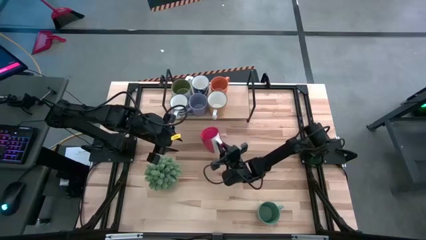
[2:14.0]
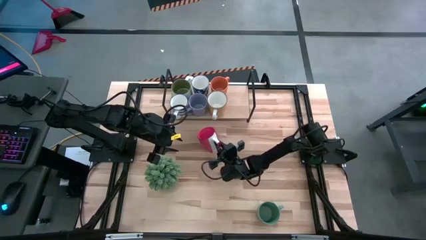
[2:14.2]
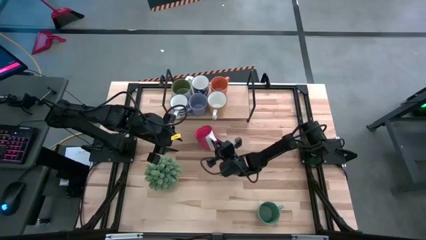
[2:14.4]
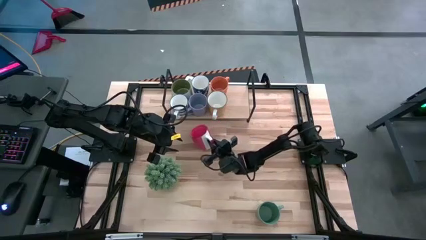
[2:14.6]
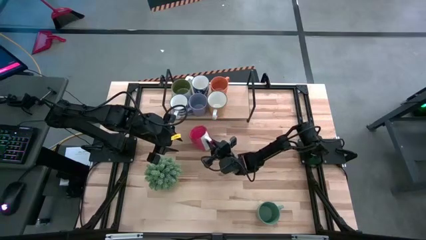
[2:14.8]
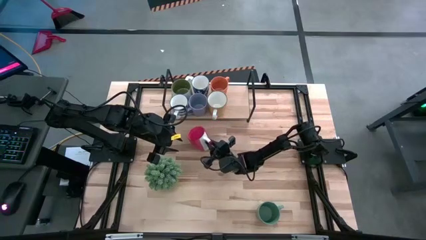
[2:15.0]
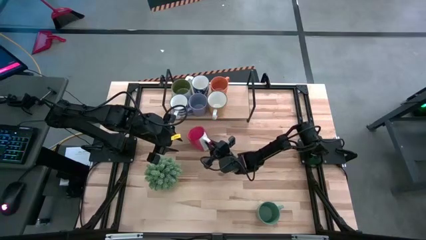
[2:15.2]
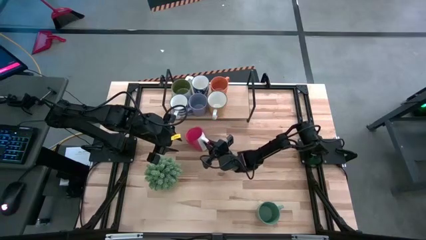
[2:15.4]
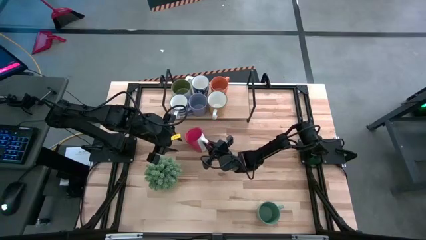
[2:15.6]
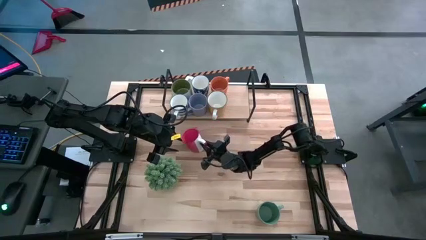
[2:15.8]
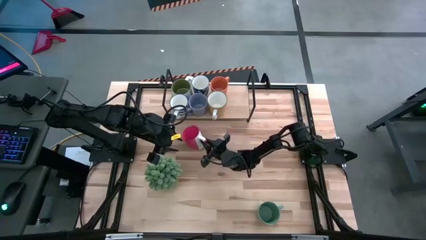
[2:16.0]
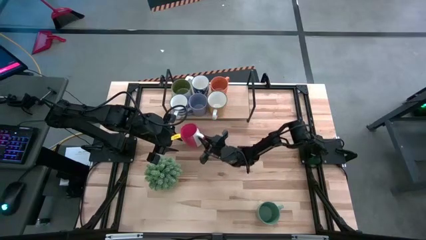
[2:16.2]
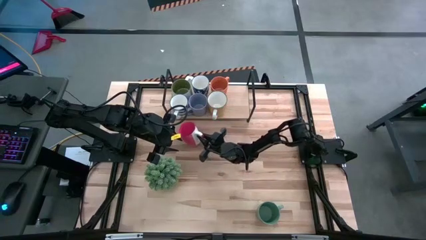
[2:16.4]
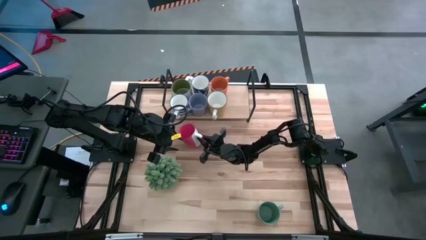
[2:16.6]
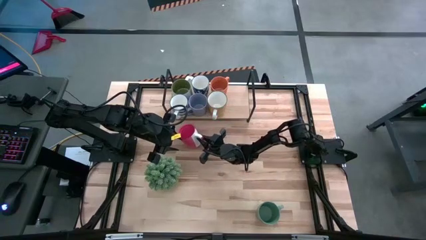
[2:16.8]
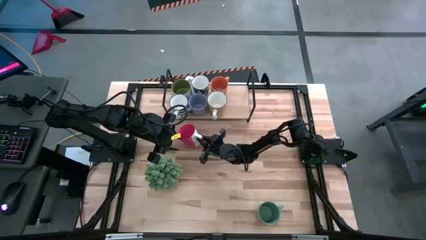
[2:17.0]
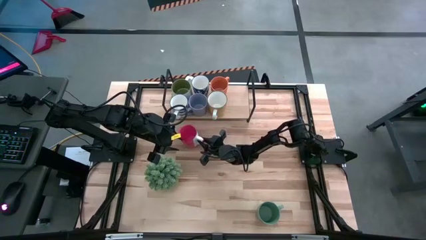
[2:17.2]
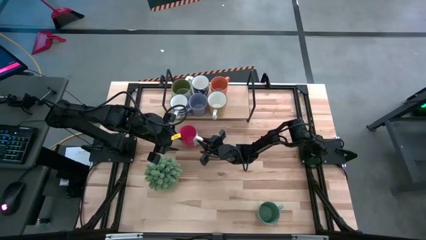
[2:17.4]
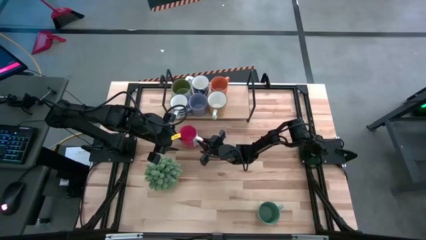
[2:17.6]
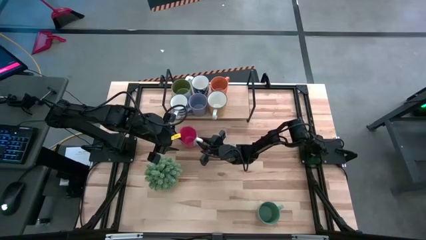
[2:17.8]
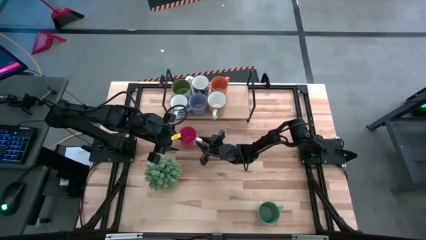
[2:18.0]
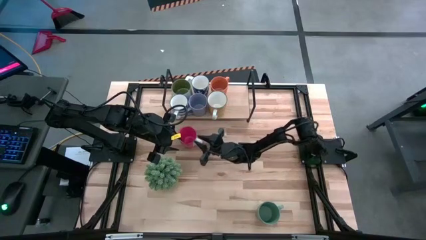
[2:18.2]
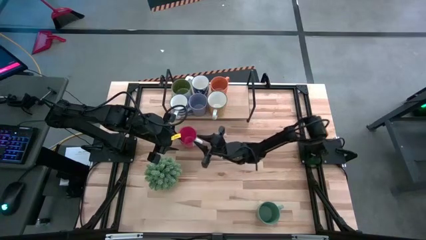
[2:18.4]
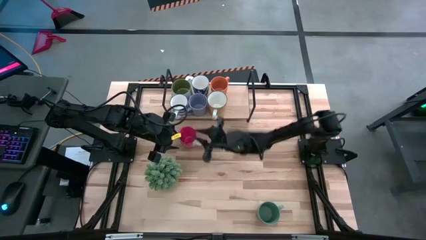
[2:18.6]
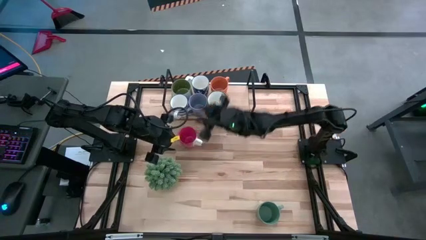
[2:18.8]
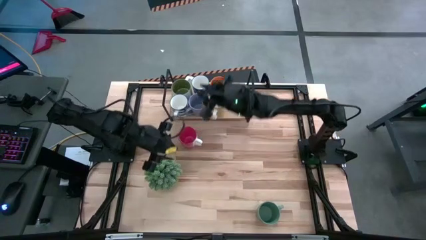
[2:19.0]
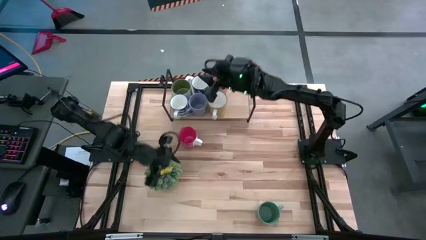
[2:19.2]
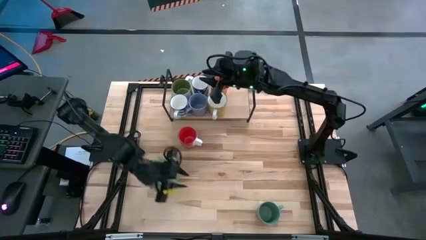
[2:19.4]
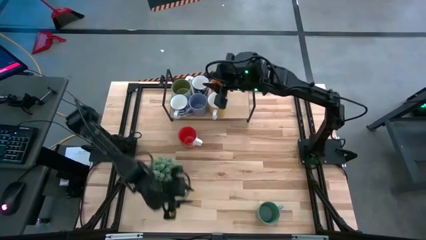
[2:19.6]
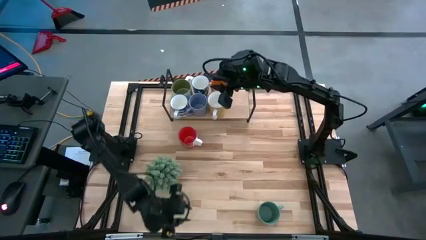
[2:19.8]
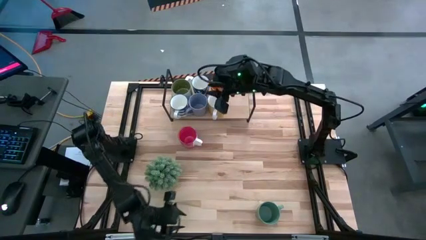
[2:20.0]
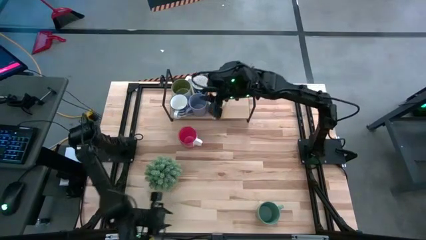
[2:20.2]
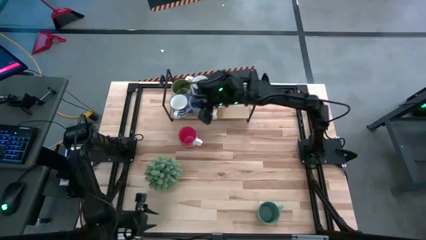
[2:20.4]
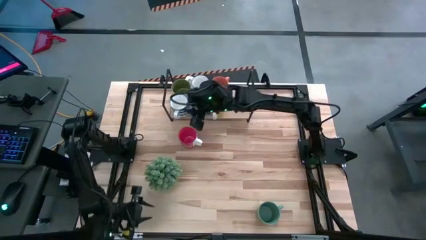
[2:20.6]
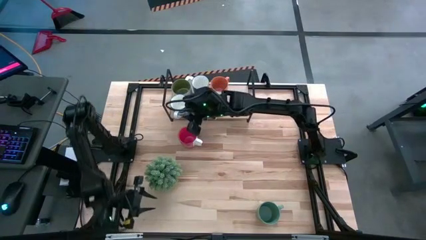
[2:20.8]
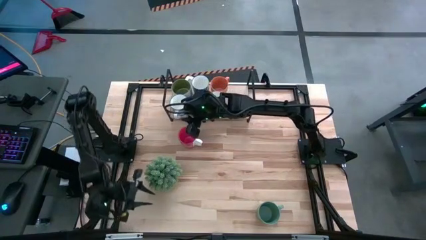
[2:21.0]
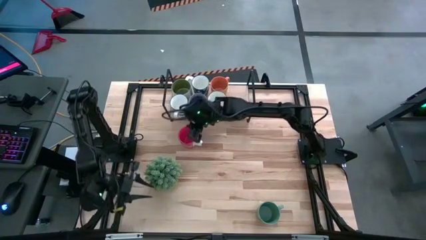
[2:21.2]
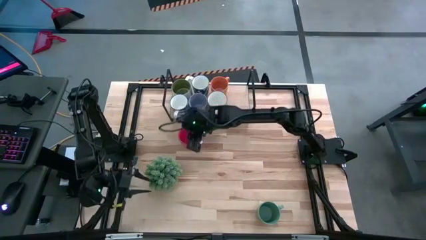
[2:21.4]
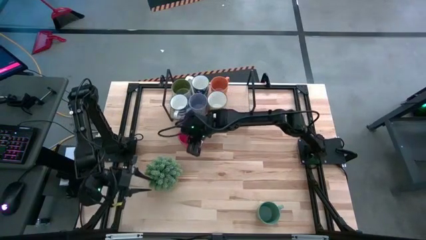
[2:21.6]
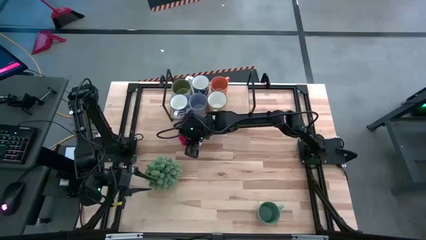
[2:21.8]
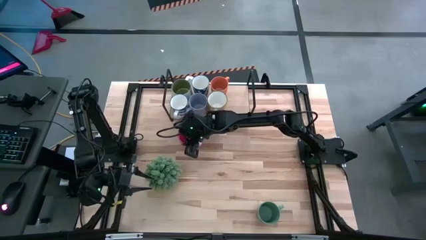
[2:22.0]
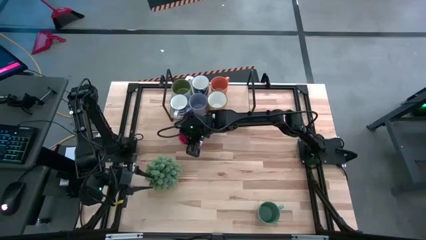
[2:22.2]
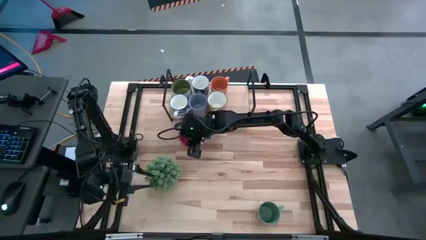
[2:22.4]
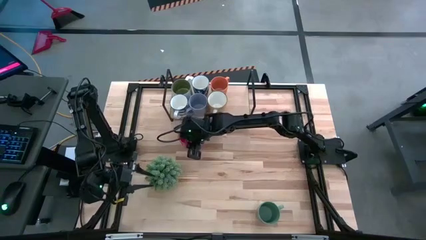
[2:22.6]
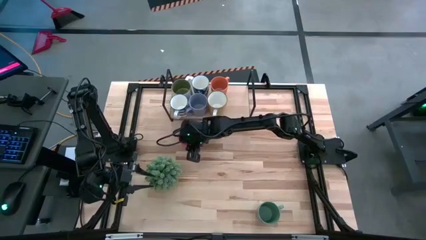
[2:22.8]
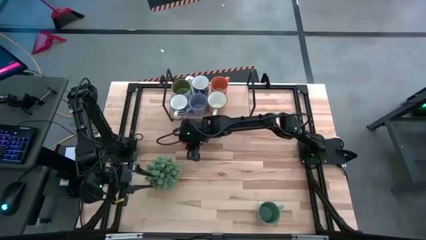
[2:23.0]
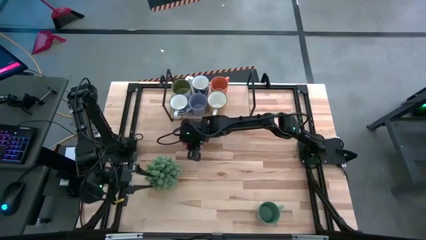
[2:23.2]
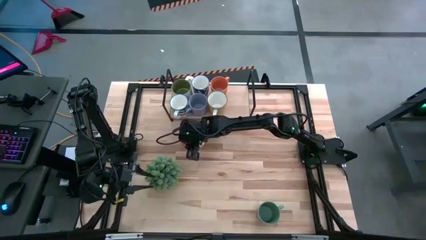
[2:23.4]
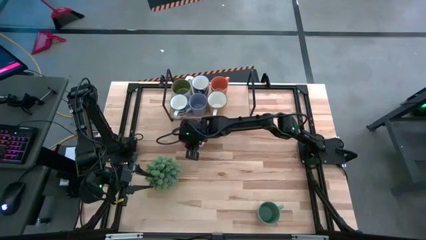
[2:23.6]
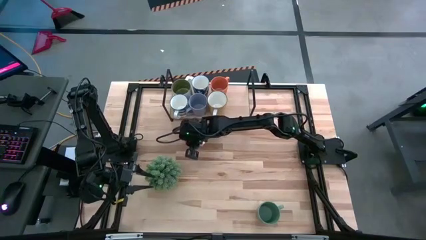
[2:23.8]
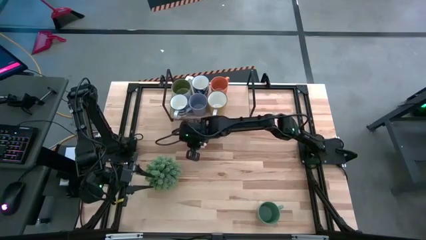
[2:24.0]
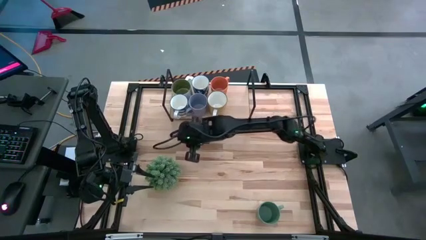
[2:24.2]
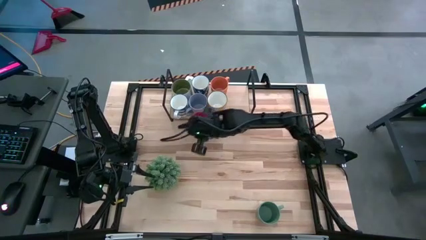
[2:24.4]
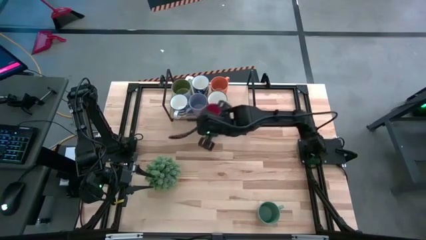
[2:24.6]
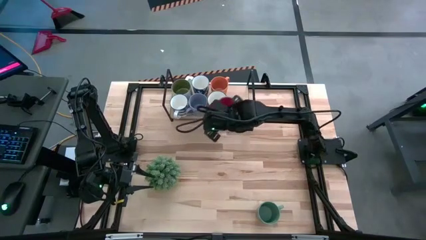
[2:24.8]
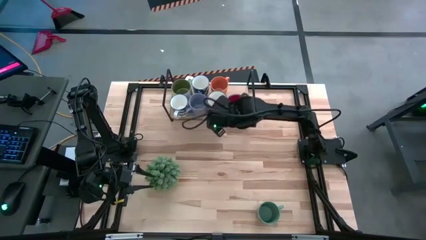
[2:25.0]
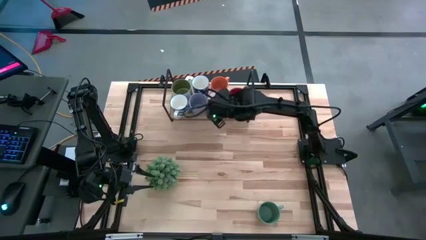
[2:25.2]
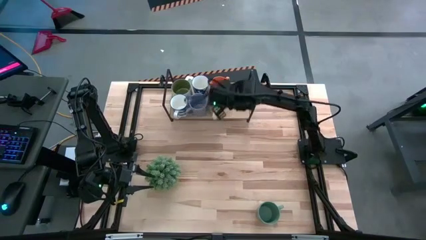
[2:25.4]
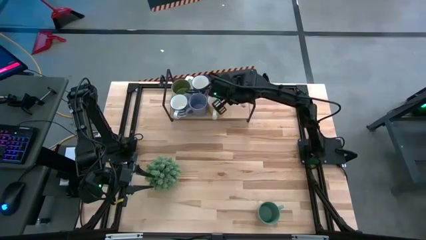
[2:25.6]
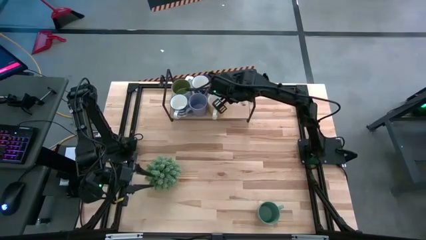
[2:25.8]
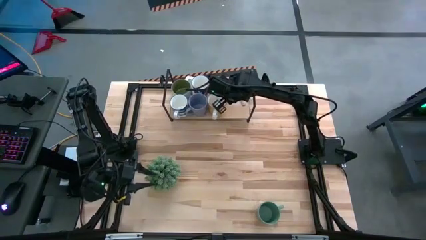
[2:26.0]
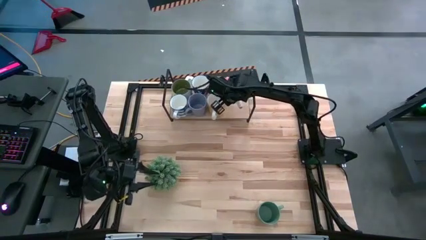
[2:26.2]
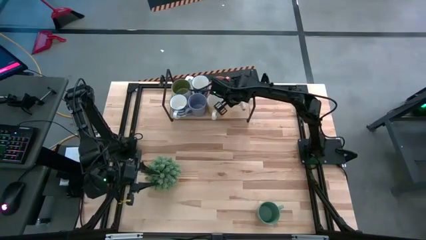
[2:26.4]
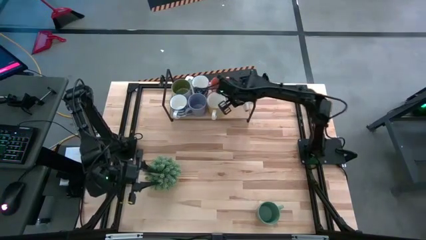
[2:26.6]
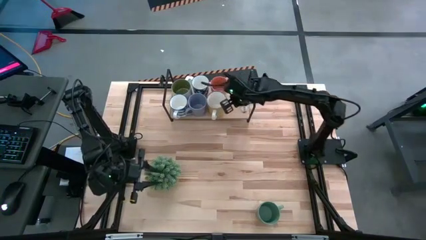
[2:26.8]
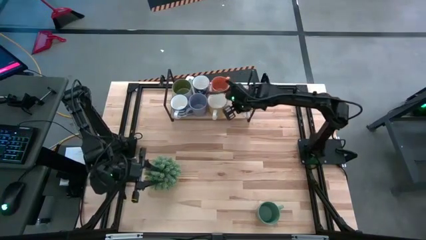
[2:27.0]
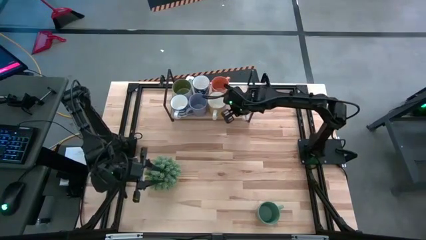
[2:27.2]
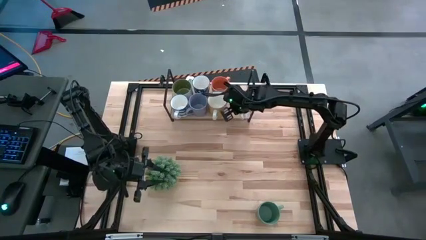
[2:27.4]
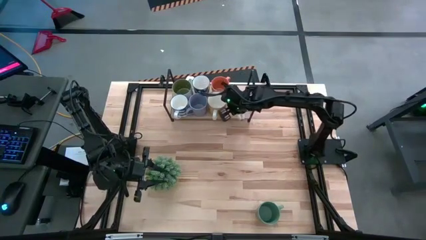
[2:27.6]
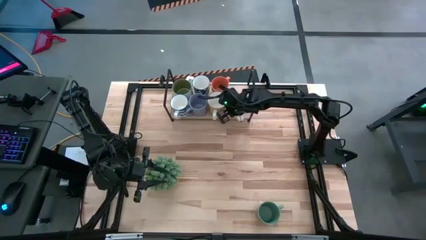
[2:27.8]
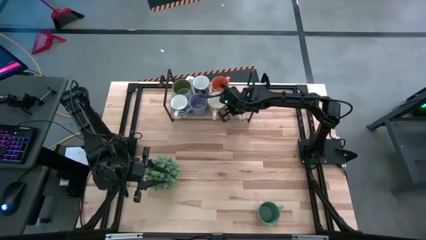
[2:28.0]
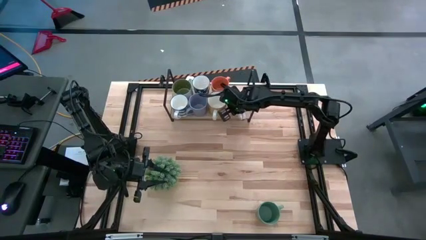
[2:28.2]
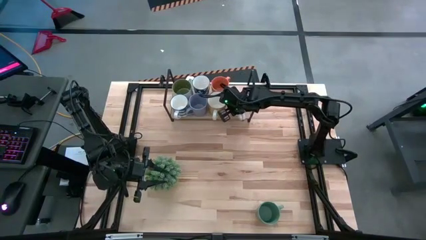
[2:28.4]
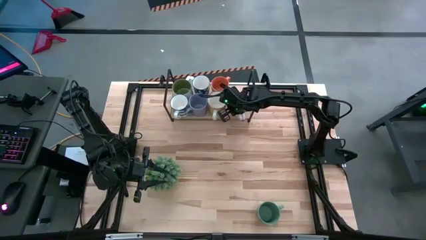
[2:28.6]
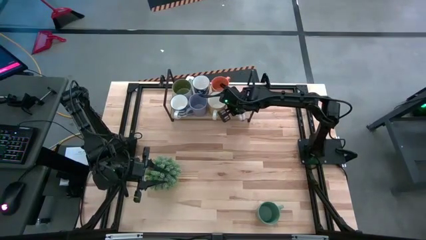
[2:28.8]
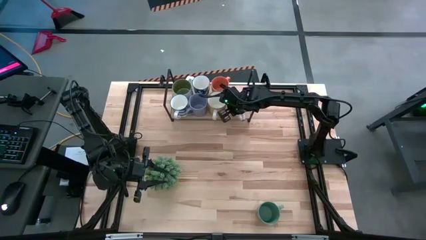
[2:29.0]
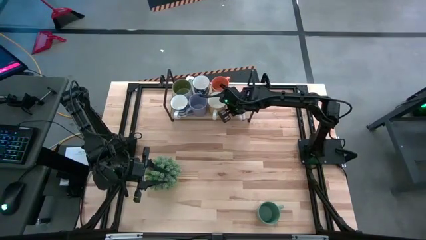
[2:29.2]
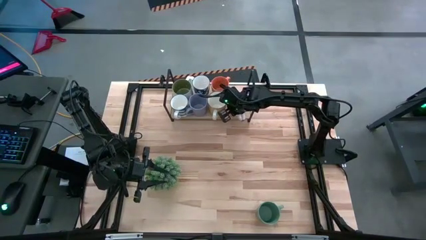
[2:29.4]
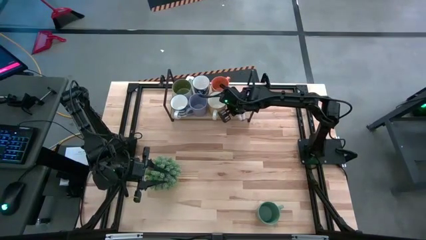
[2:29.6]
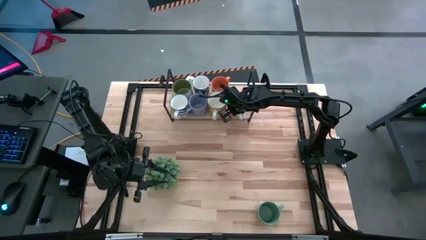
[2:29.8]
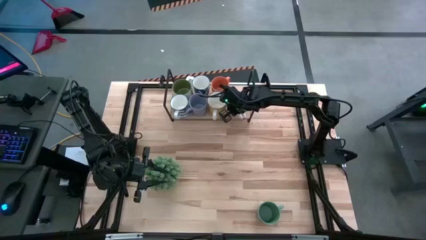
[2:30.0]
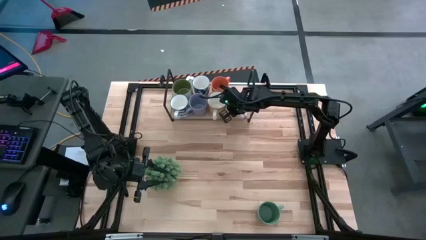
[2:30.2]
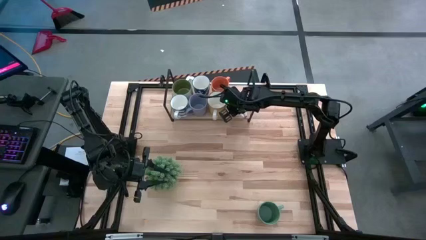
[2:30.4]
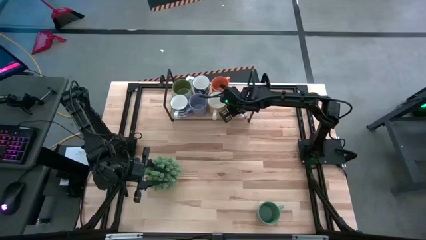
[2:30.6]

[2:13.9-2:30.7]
Task: Place coffee mugs
Put the red mug on the shelf
